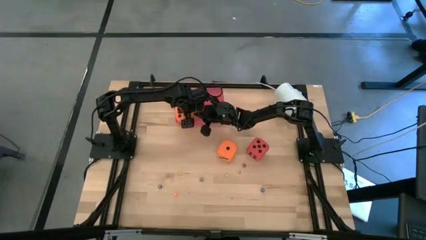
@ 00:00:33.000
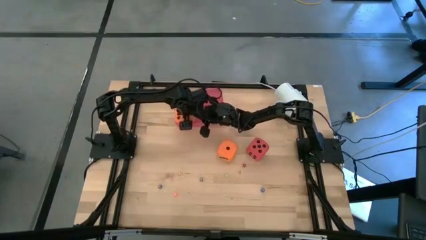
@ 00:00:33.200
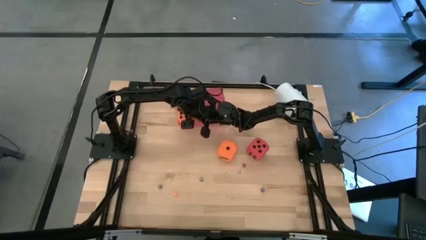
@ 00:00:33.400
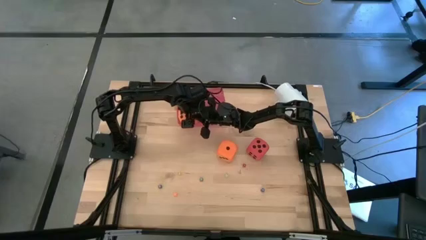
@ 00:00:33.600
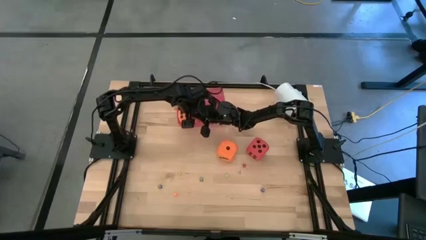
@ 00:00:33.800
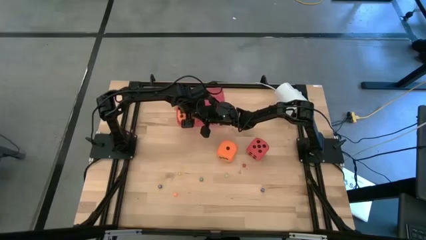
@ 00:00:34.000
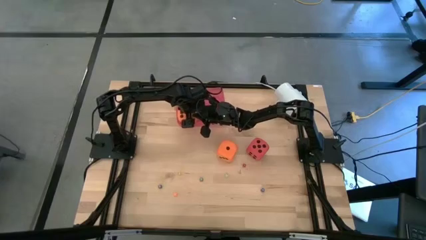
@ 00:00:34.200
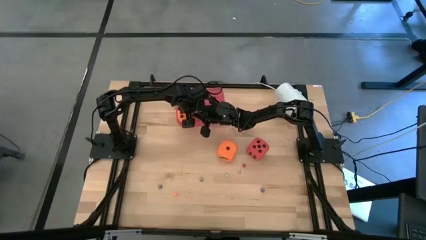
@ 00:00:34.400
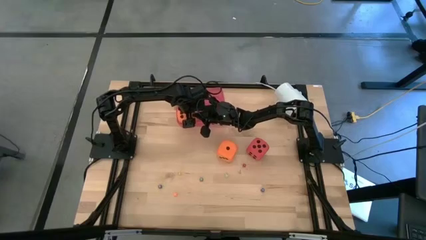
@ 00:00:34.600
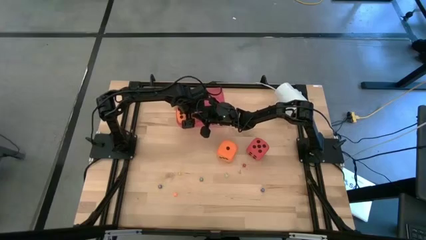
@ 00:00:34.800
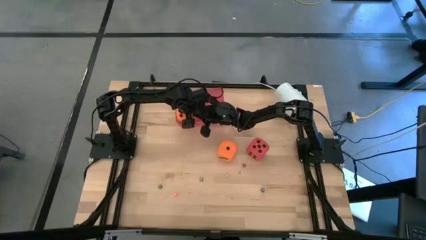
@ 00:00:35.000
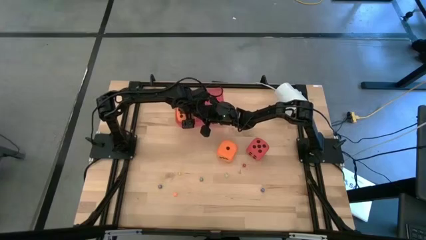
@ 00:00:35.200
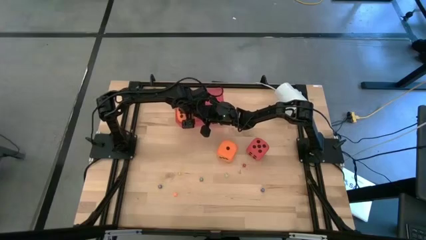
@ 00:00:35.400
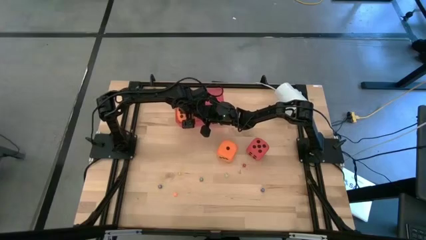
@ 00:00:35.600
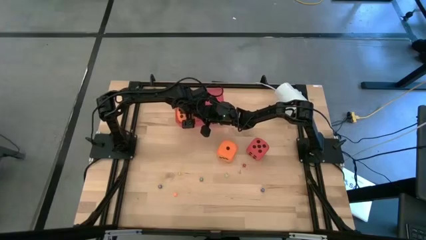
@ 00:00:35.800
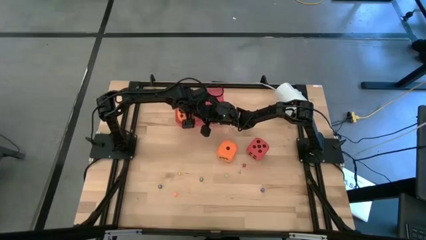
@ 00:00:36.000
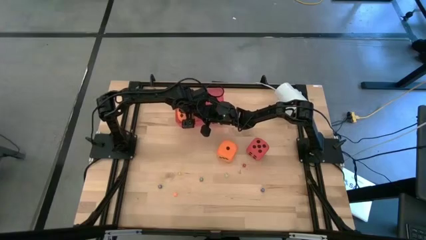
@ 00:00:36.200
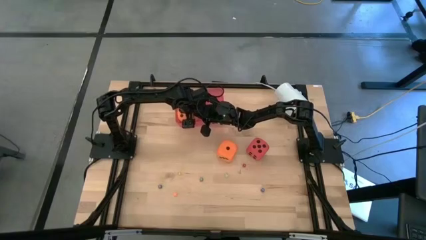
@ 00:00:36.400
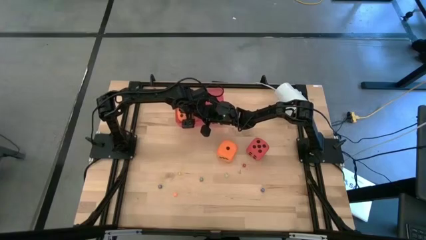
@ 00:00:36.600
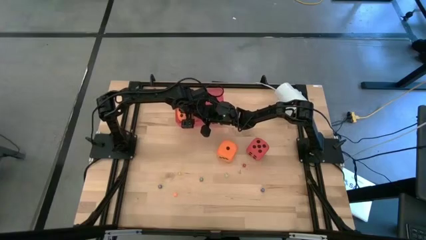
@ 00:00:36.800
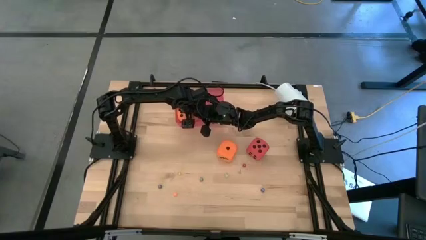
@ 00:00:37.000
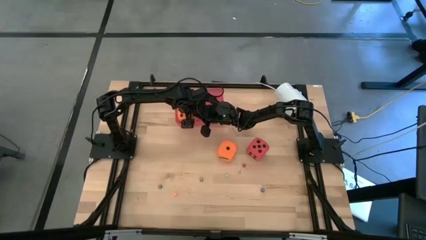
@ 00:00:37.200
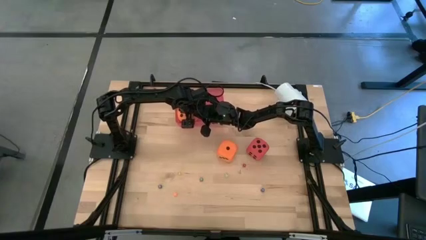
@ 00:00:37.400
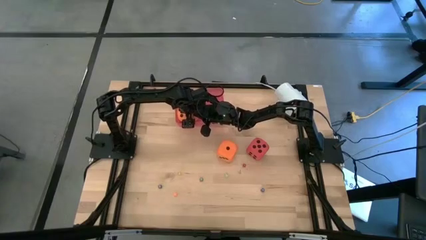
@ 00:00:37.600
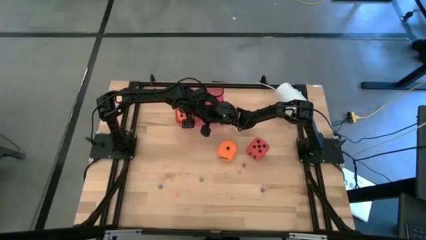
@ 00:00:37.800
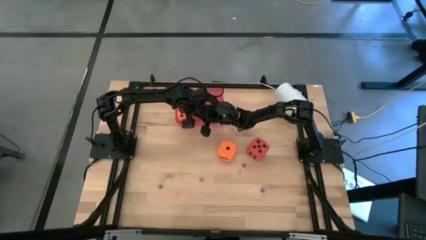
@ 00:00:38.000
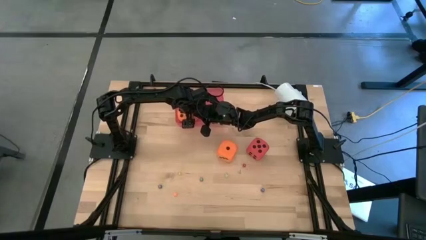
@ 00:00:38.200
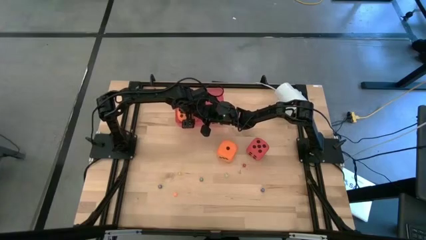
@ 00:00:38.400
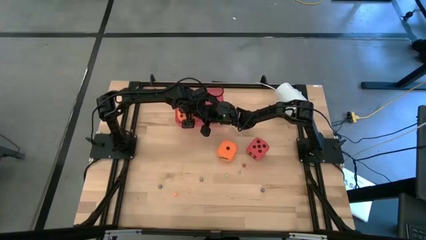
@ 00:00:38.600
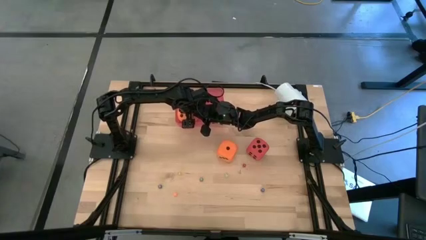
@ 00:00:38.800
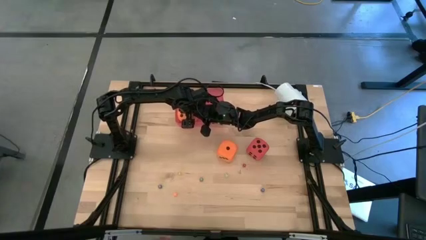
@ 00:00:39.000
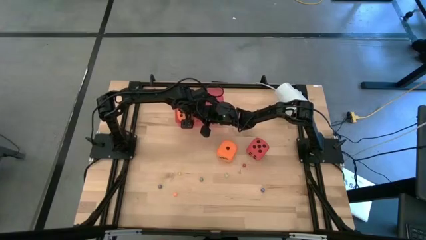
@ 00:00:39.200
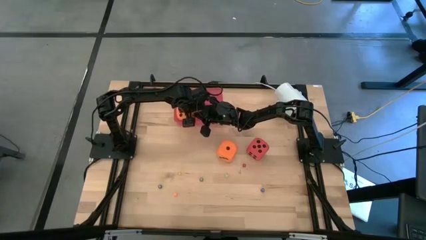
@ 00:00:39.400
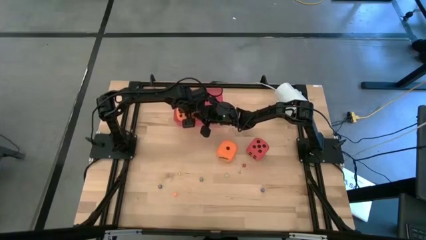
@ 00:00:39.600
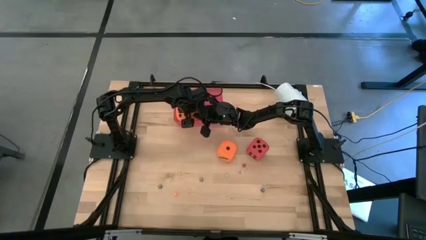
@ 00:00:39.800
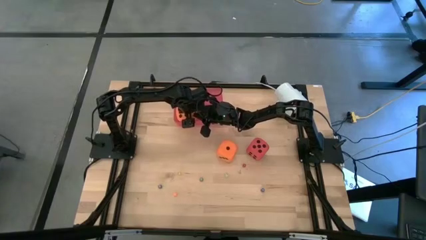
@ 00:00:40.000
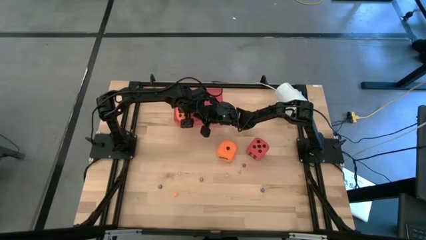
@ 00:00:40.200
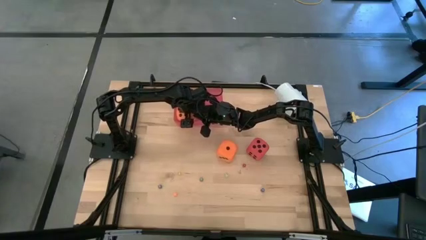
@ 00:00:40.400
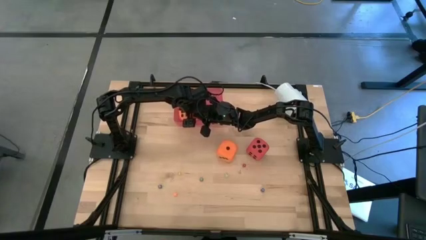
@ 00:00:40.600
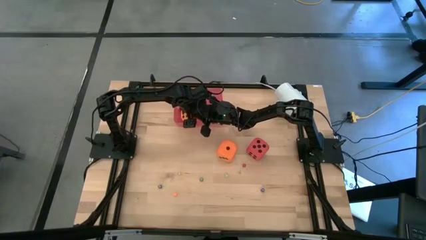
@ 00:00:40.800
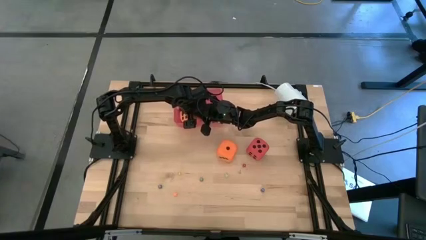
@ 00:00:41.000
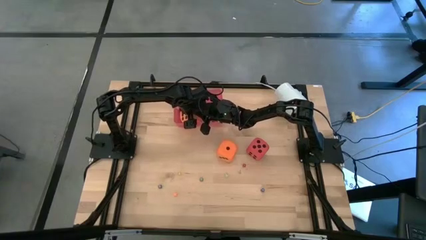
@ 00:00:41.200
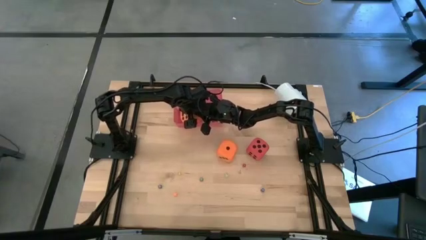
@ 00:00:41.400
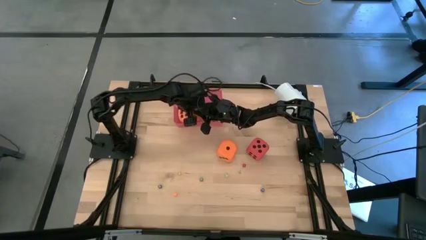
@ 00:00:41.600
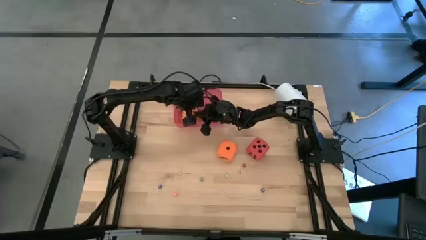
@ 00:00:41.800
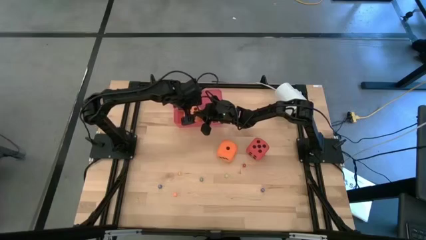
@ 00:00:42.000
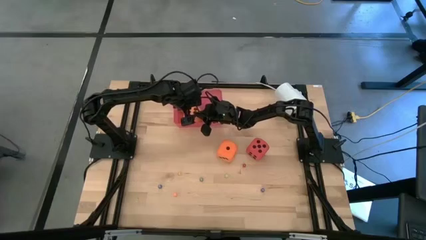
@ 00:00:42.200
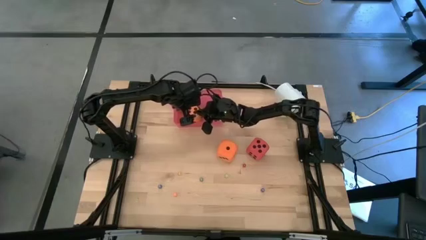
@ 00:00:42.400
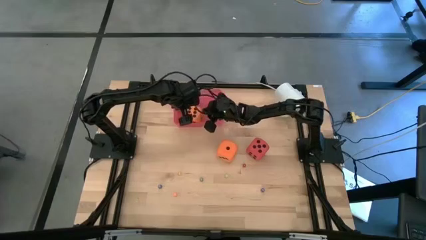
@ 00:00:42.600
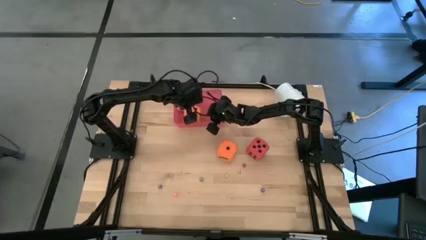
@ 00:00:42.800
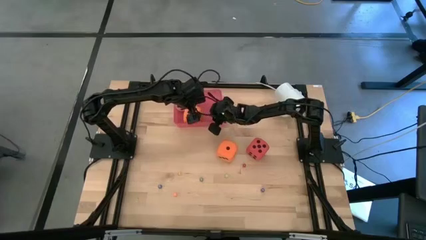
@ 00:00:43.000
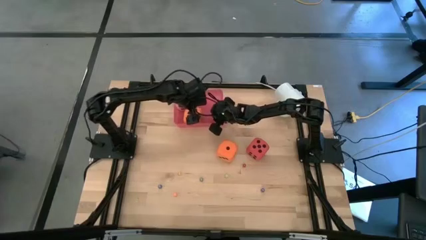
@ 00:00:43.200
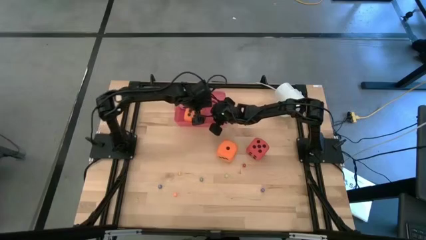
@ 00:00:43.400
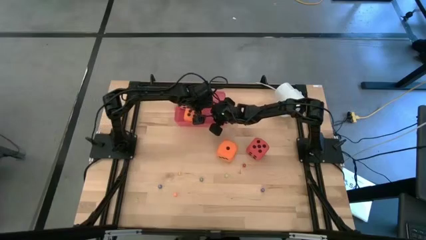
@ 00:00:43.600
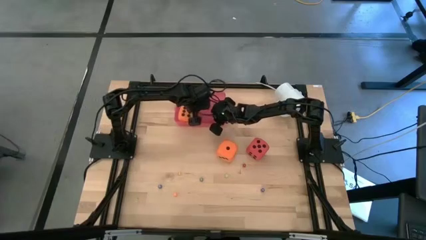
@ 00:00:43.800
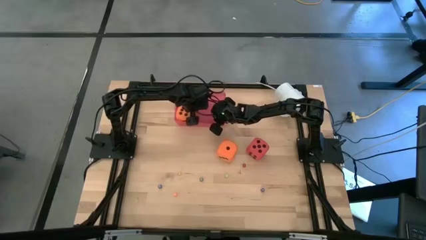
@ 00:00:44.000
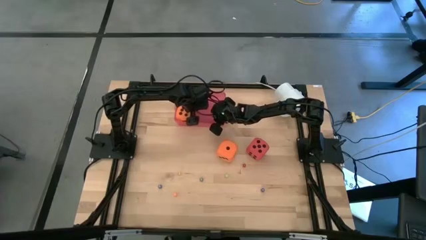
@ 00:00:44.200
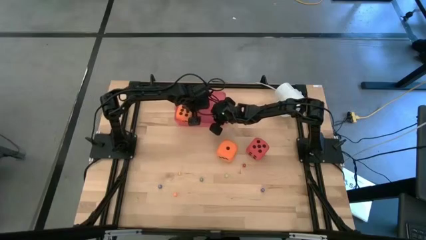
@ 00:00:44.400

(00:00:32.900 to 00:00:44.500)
Task: Pick & Place Dice
Put the left large orange die into the red bin
